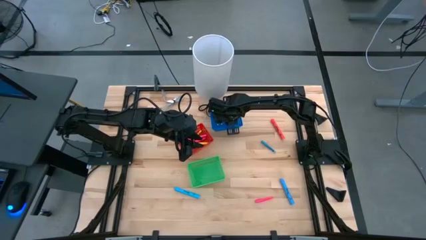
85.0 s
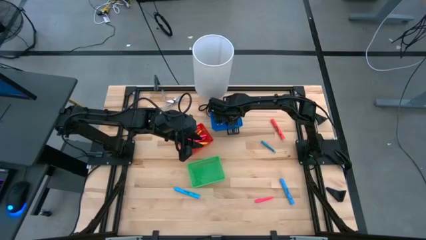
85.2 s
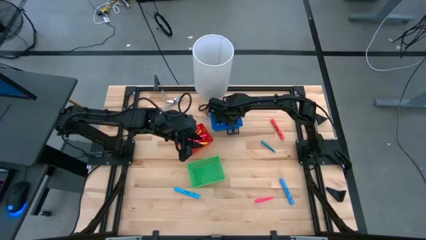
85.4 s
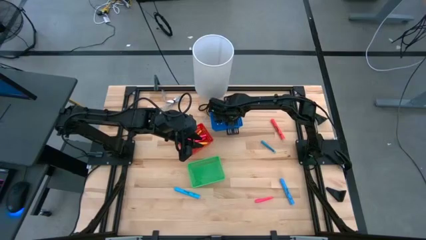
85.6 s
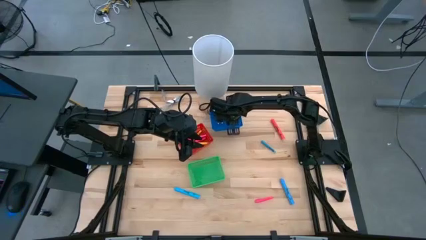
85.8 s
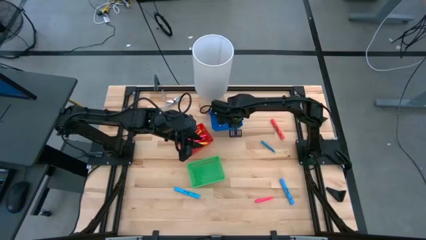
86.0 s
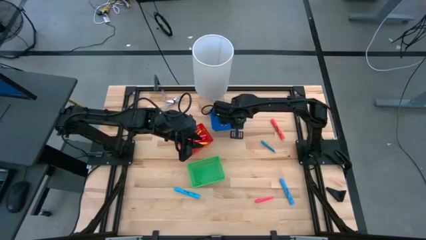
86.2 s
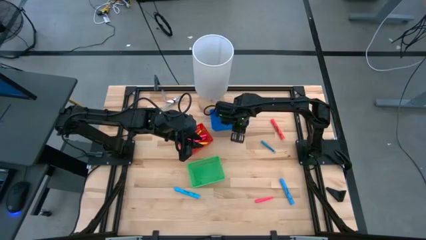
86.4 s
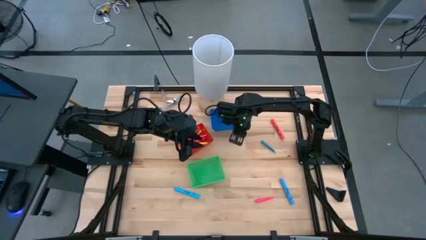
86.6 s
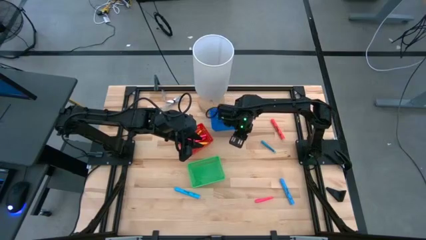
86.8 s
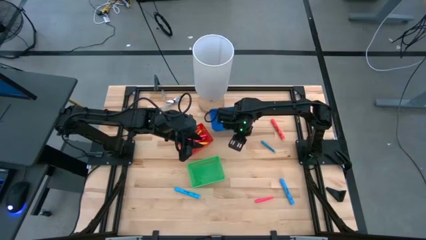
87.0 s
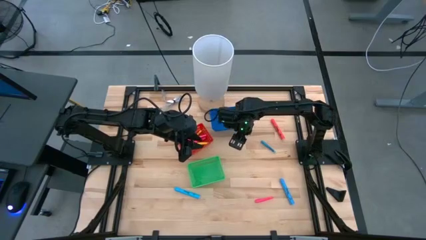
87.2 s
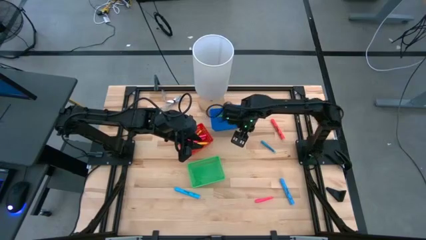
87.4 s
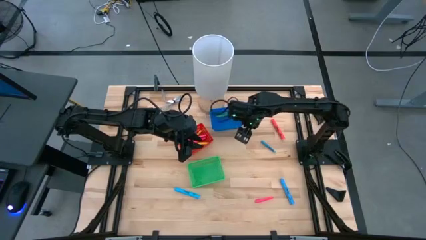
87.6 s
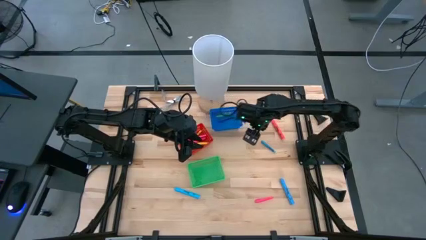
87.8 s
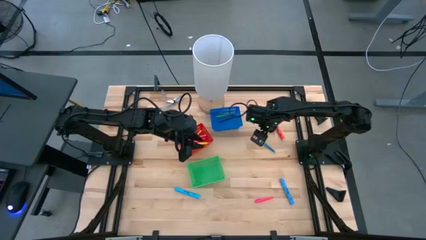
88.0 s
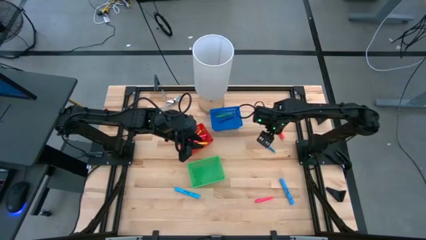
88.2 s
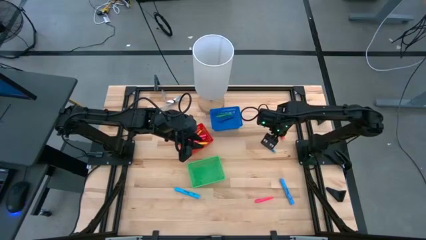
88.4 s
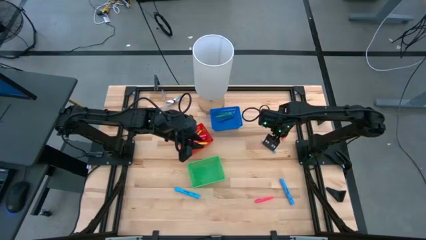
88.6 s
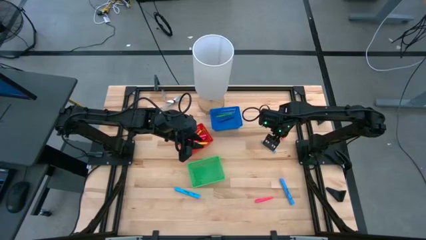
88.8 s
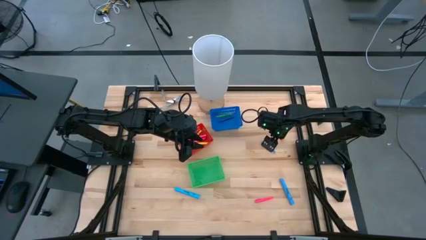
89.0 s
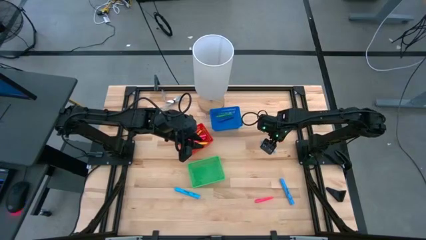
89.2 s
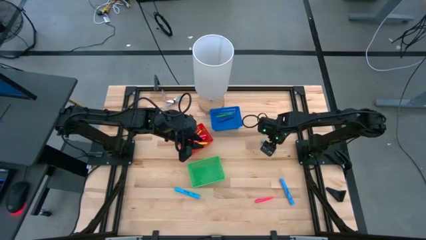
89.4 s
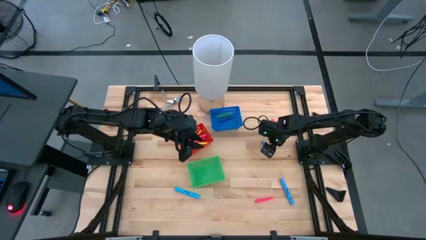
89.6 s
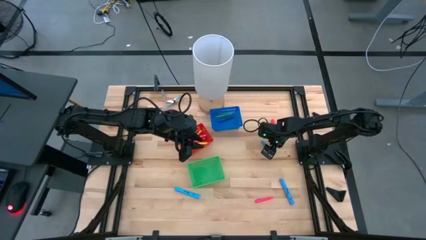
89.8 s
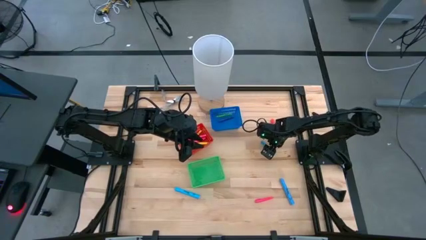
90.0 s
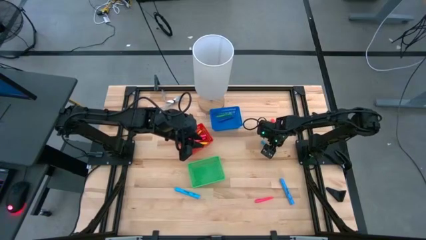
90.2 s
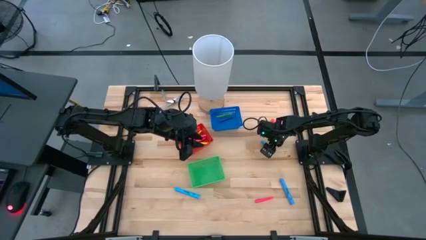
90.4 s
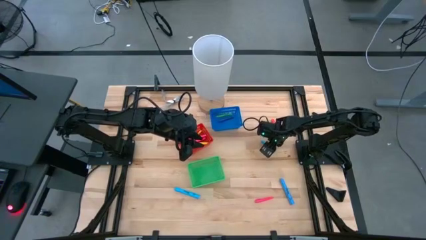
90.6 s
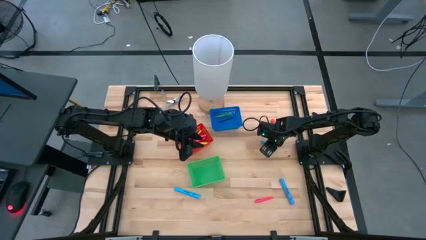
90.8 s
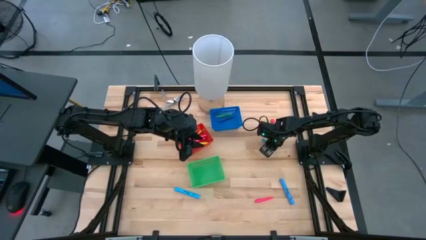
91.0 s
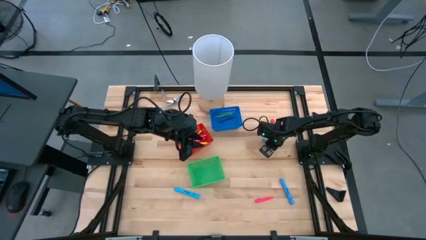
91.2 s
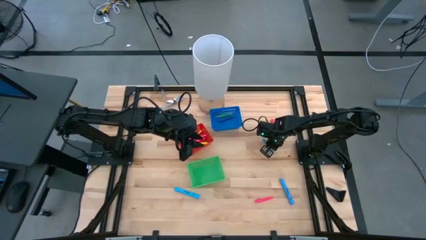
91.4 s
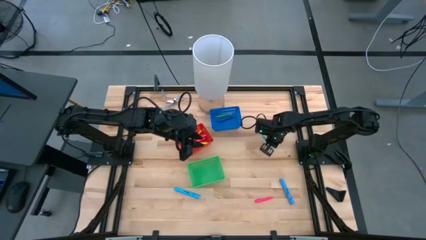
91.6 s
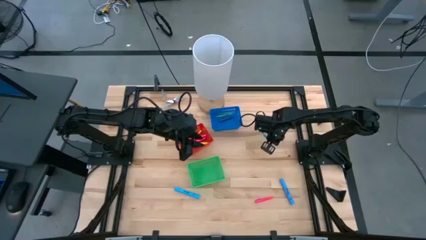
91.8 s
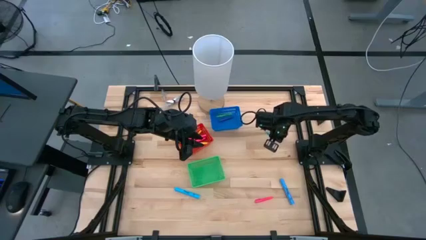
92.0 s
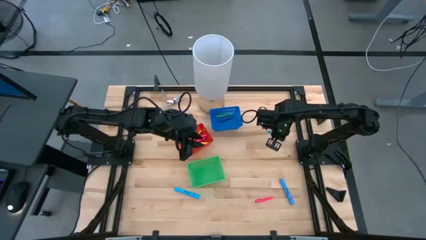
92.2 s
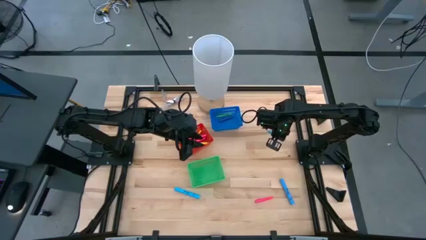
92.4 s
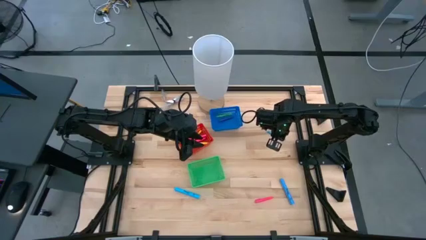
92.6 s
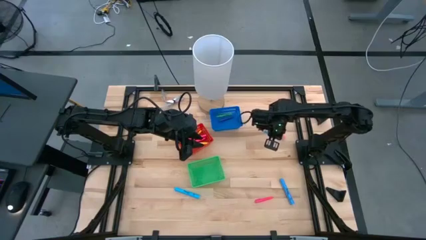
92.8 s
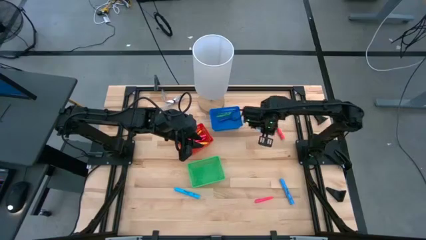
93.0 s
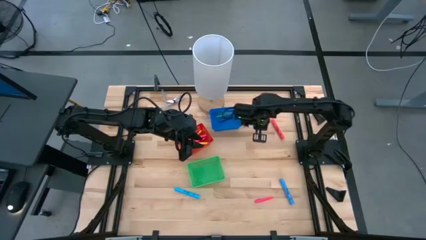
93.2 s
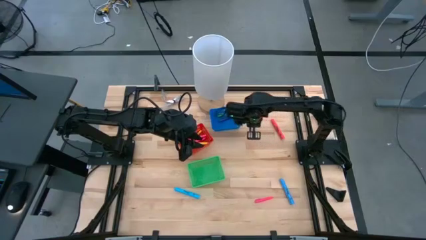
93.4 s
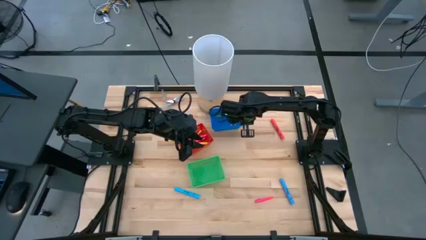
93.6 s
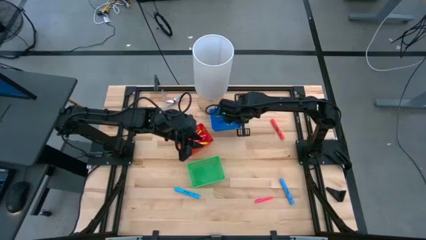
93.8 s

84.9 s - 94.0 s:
Task: Pick & Place Markers
Put the blue pen into the blue bin

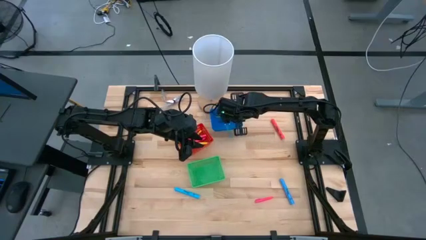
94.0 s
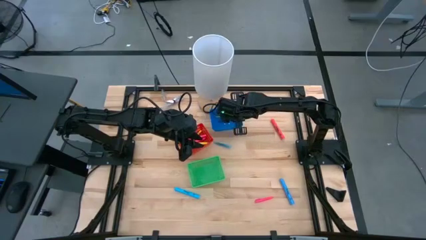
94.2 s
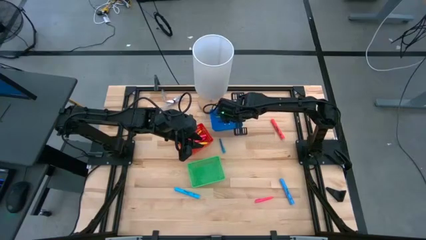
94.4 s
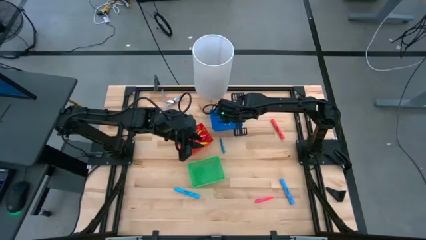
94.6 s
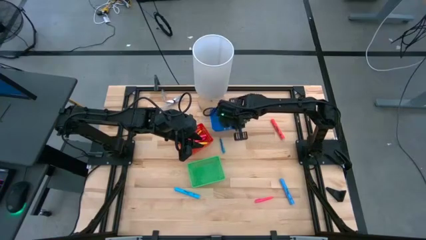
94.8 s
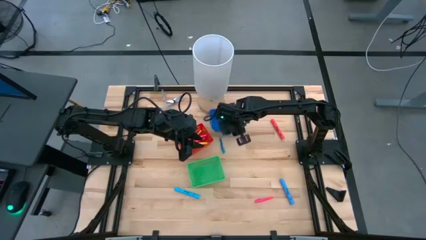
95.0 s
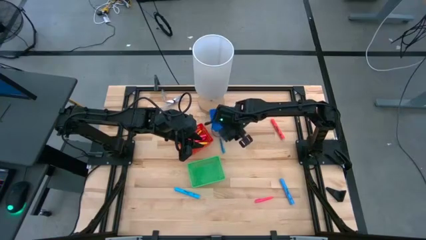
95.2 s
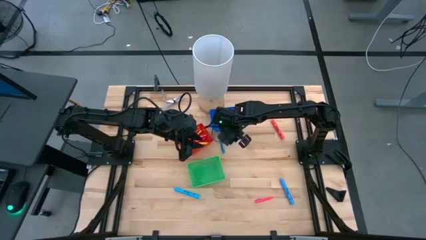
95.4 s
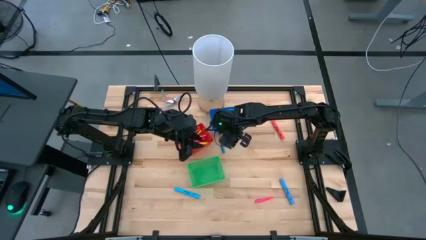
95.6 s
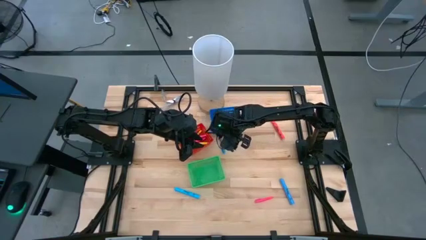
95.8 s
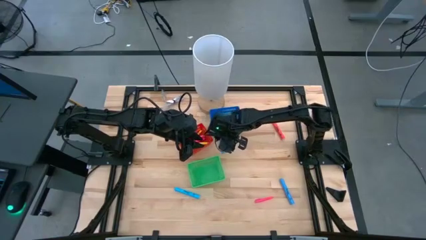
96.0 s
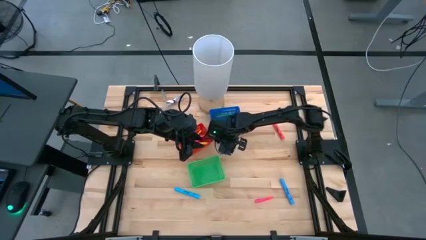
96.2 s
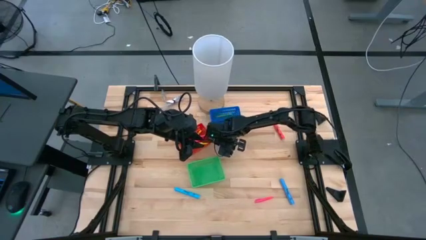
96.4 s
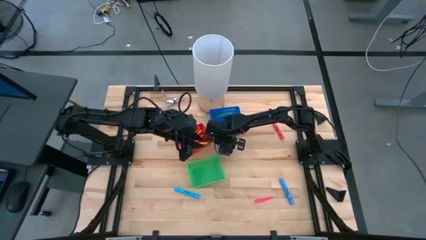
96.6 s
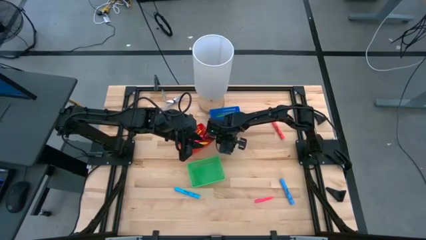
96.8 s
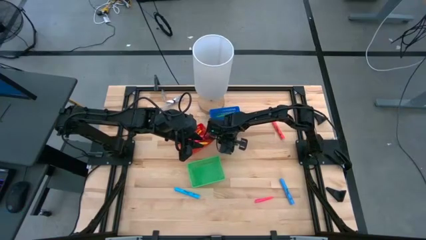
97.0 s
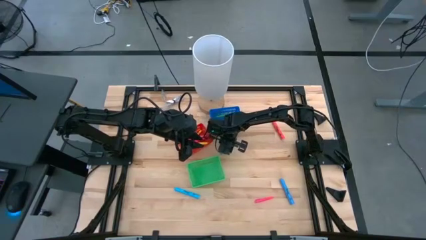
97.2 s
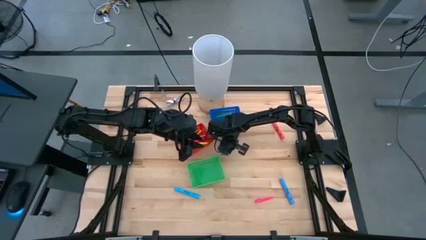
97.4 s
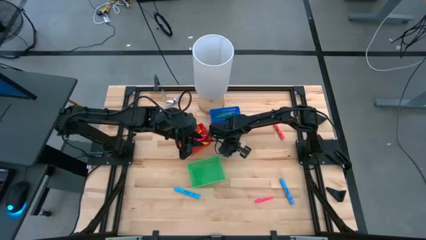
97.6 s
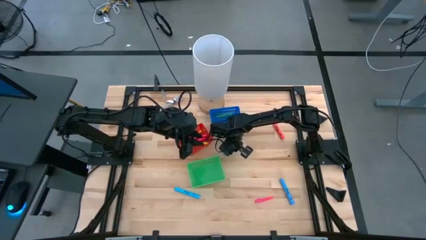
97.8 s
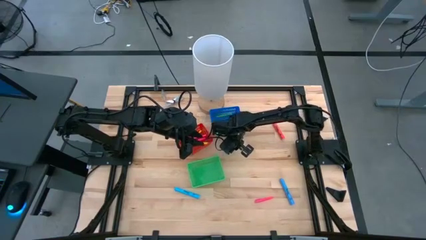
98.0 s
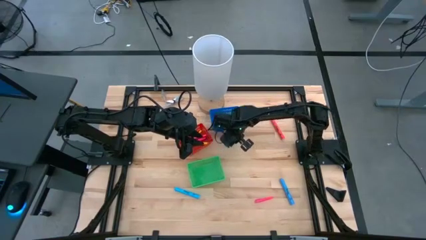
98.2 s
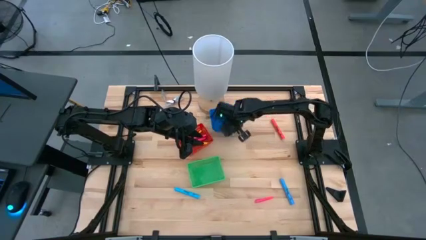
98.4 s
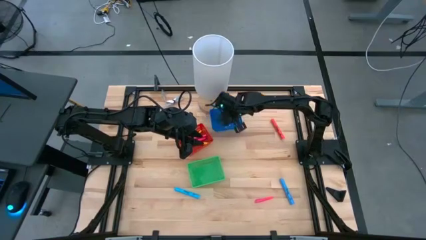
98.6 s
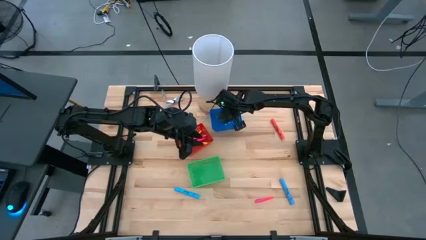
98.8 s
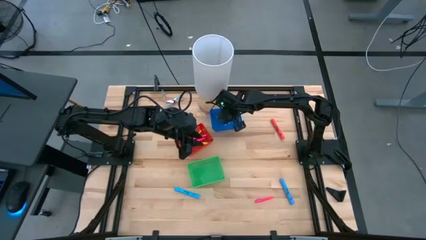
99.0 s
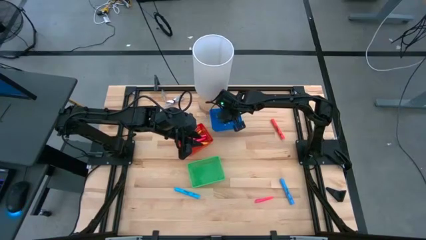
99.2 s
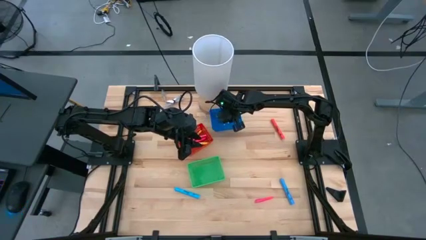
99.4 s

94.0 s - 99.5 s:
Put the blue pen into the blue bin

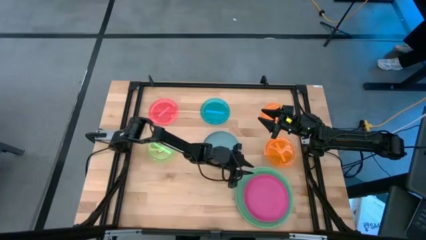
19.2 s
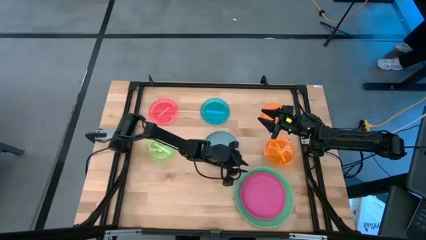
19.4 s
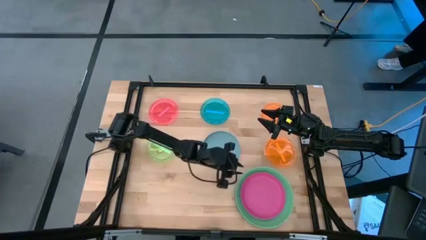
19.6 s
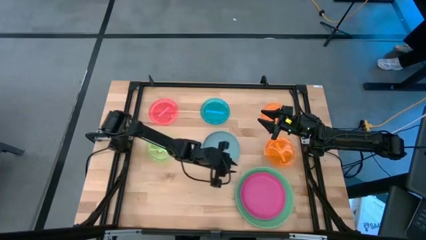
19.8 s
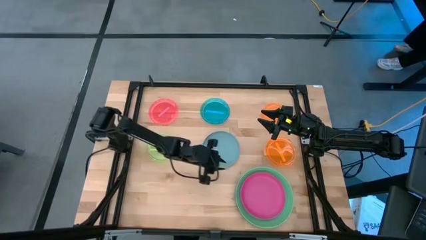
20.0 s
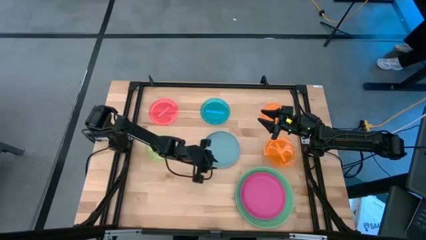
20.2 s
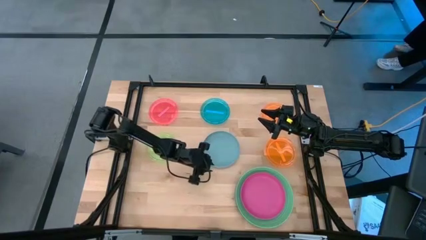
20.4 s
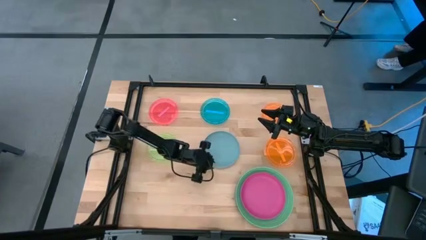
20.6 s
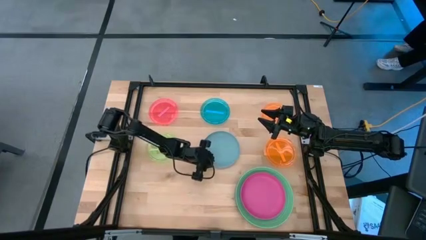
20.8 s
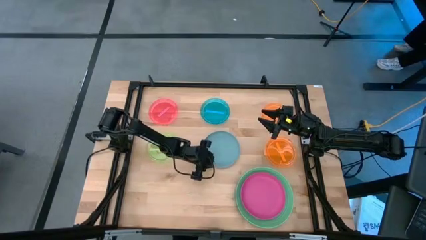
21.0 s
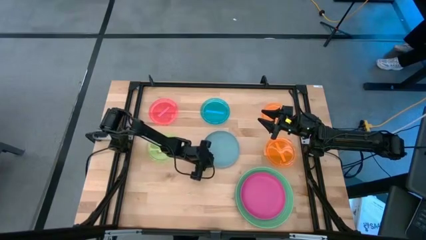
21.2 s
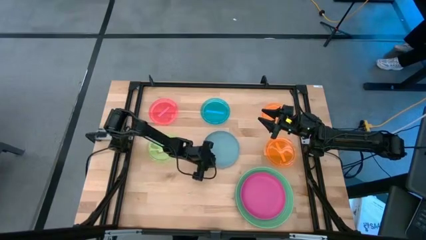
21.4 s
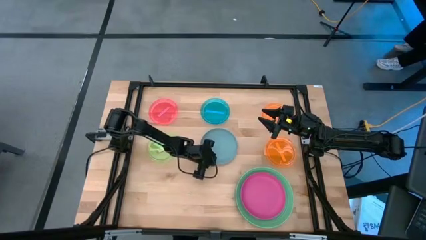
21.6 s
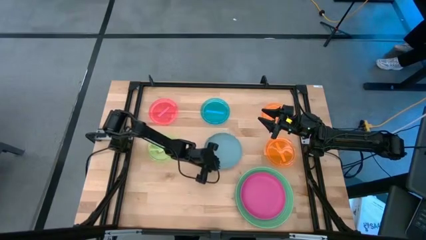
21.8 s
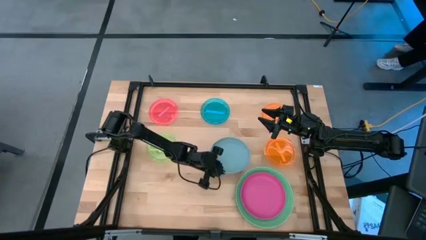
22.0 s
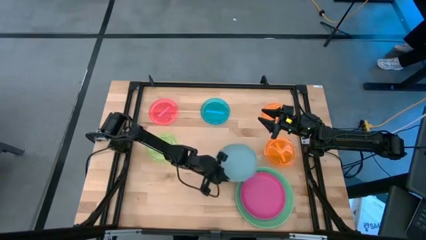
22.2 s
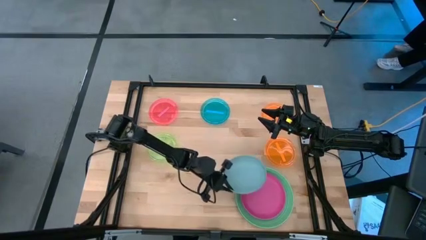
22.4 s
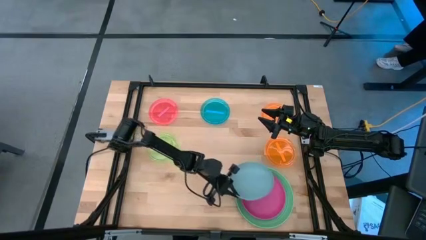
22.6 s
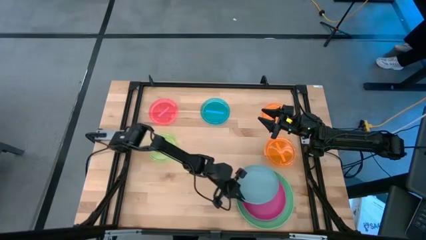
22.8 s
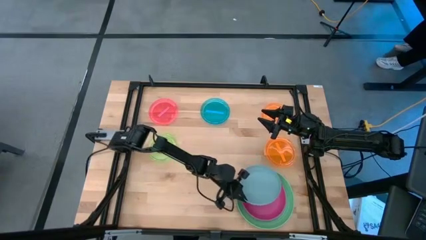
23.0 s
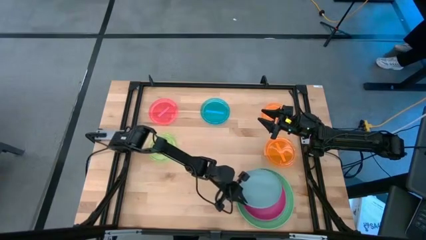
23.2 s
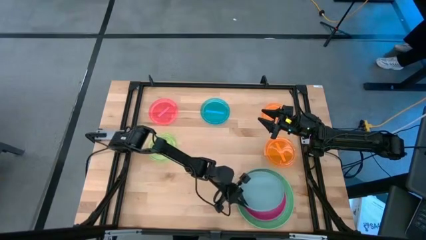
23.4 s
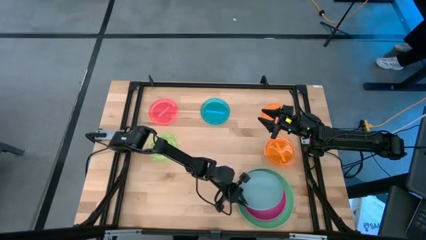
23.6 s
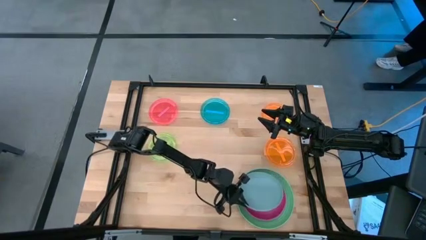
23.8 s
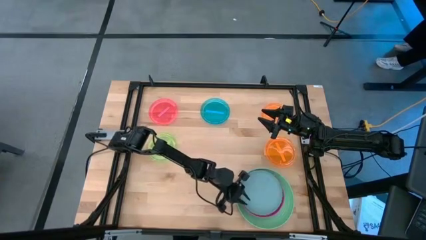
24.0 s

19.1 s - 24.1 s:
Task: Stack plastic plates
Stack the light blue plate on top of the pink plate
